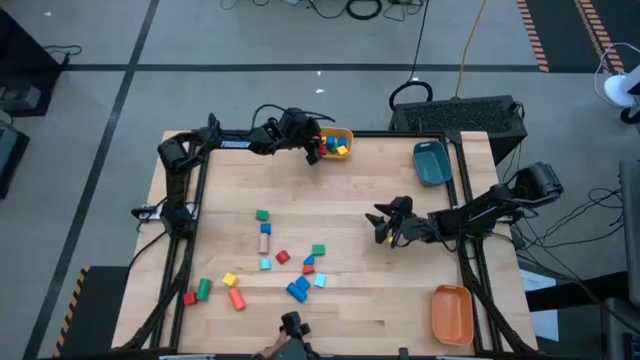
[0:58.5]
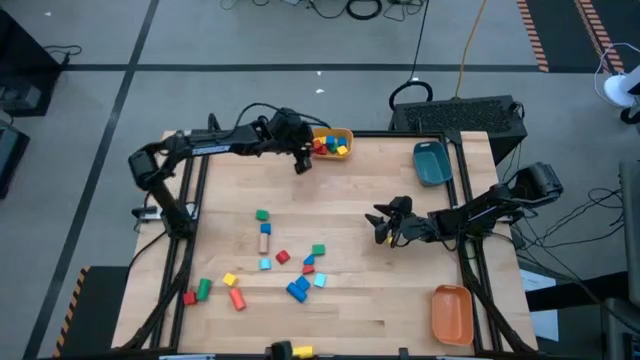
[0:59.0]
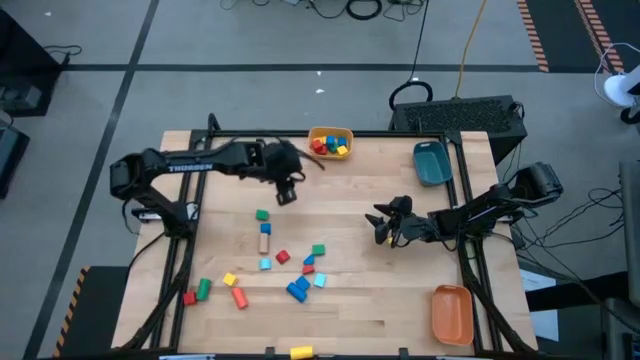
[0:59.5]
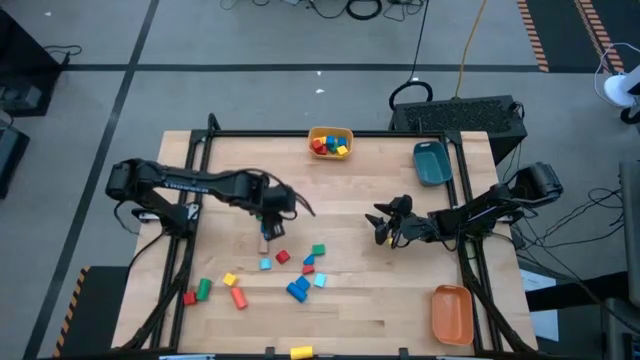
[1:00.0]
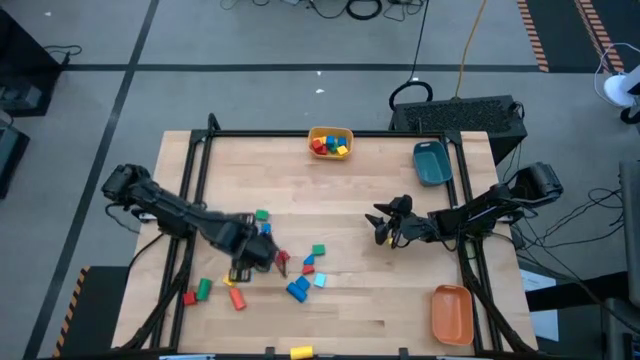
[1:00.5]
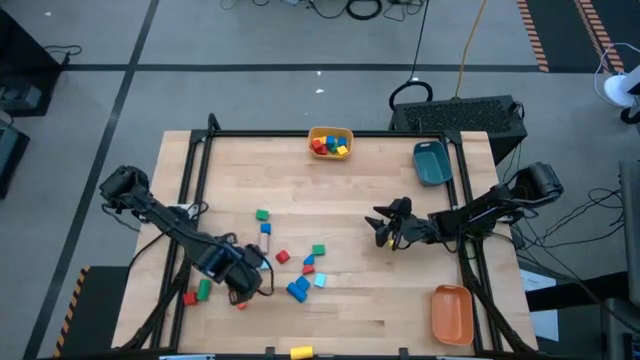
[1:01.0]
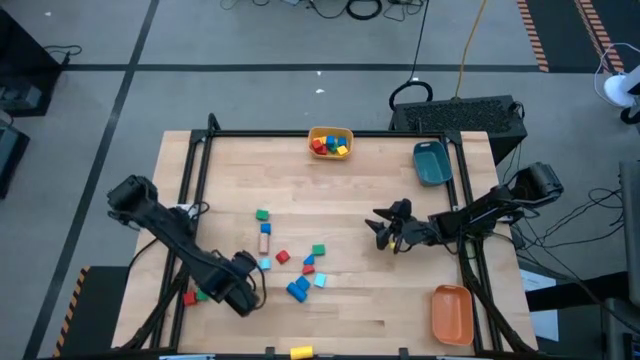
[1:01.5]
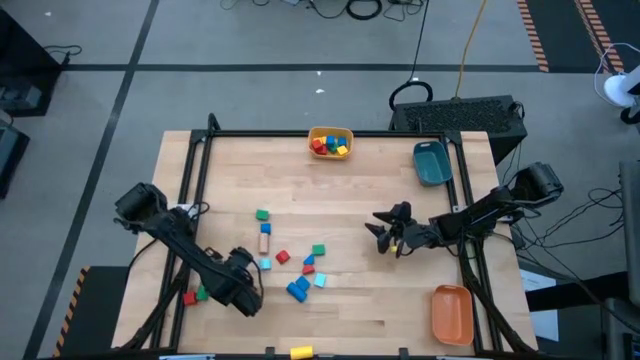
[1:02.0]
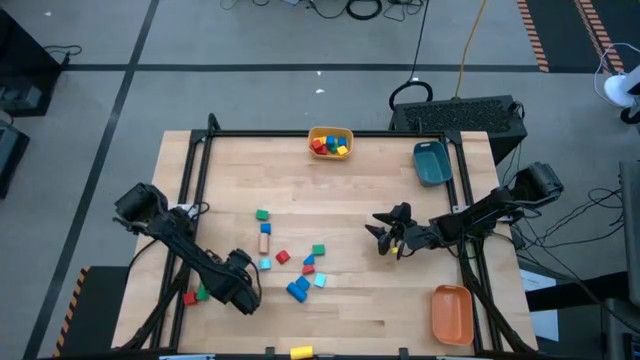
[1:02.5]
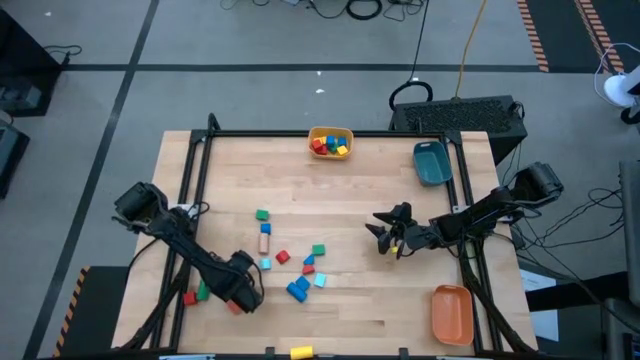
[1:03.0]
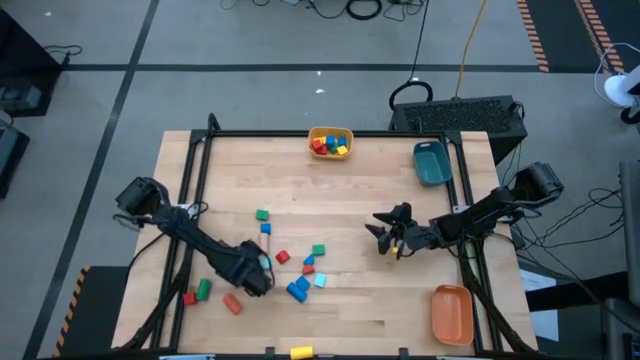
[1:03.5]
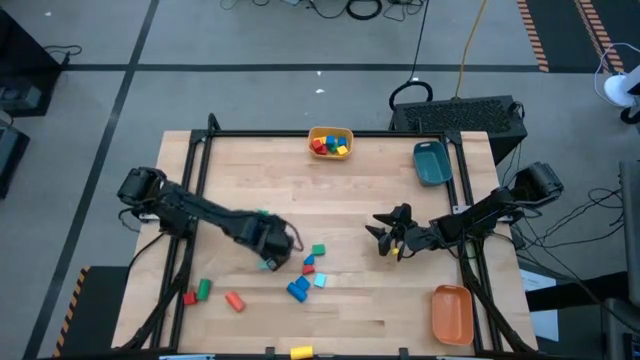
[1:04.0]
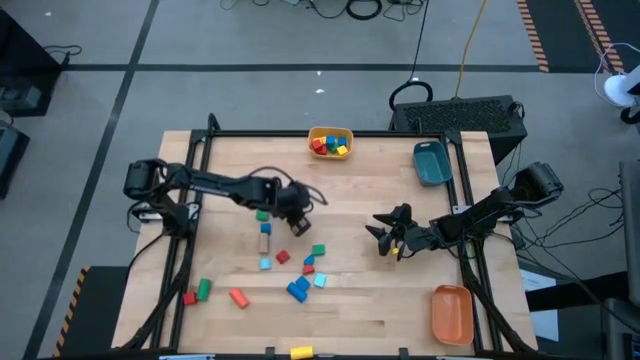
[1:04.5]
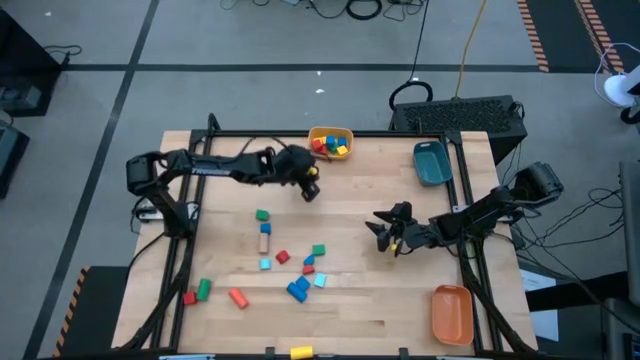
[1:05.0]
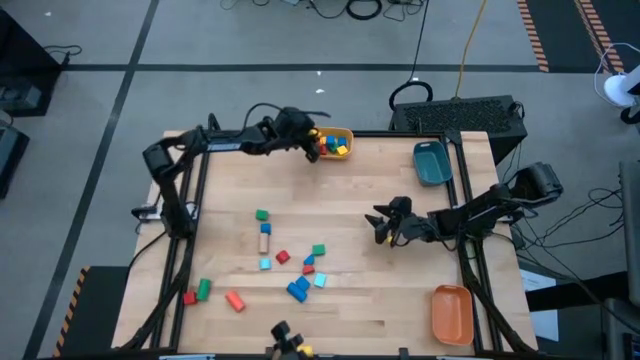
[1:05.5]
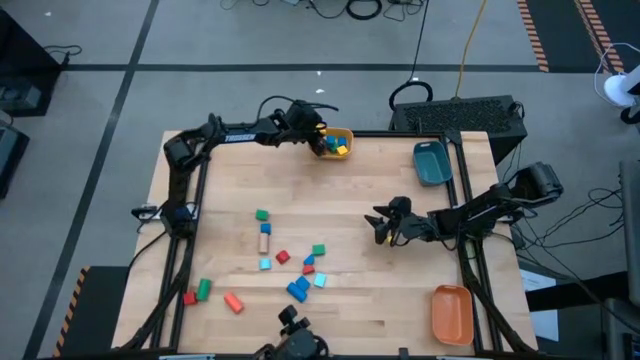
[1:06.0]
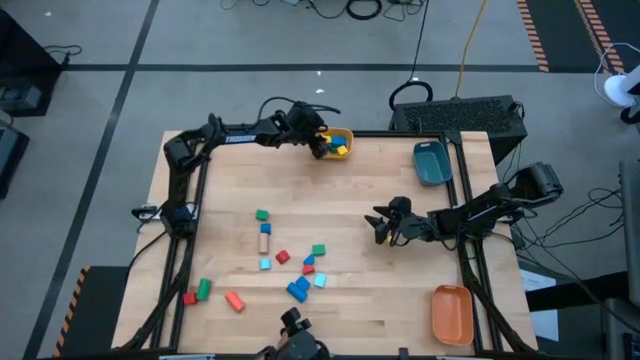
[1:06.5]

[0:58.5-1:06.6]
Task: Sort blocks by size
Put the yellow square block into the yellow bin

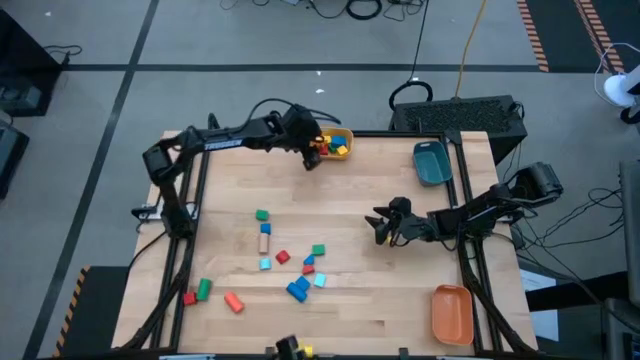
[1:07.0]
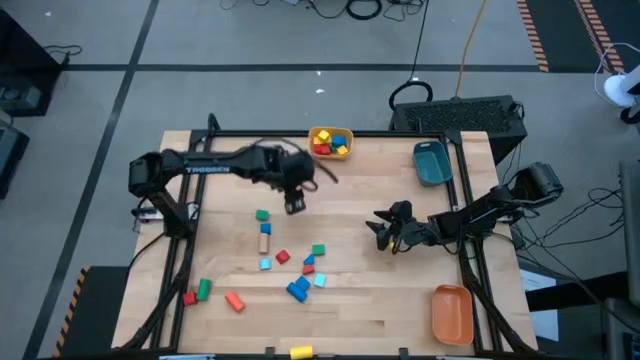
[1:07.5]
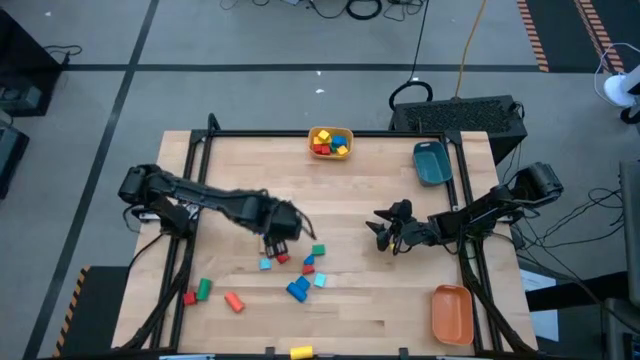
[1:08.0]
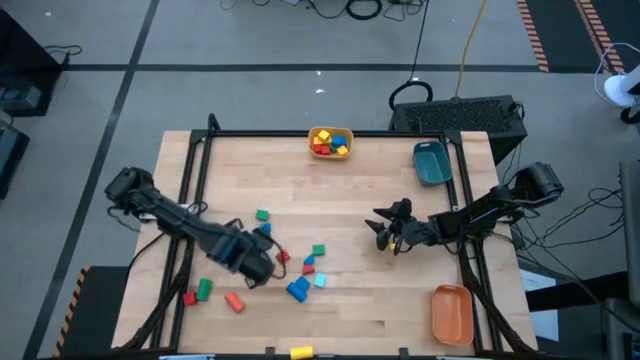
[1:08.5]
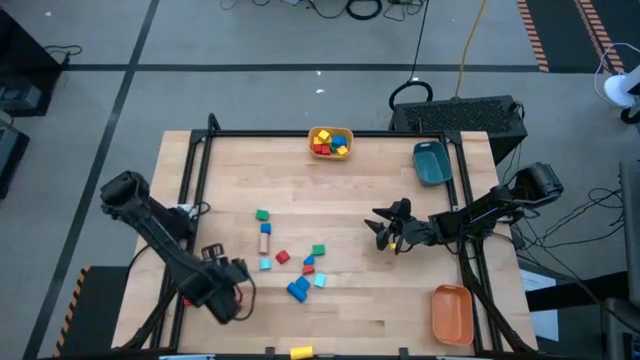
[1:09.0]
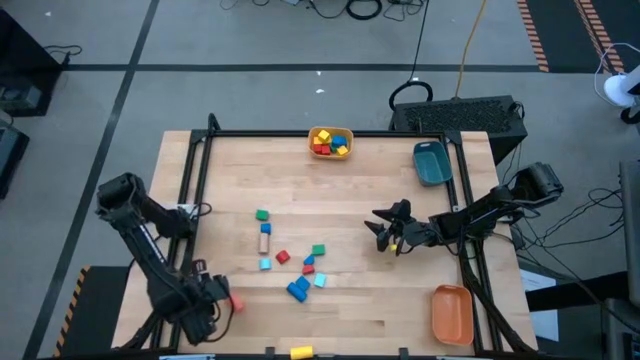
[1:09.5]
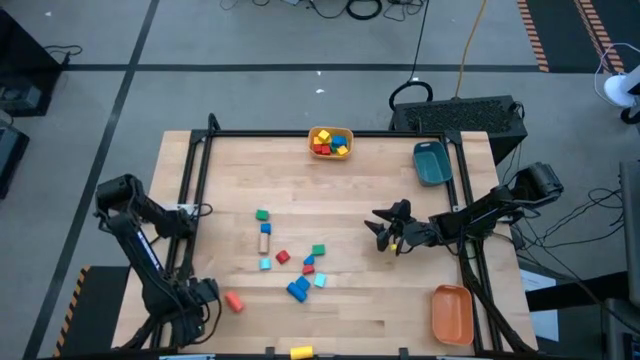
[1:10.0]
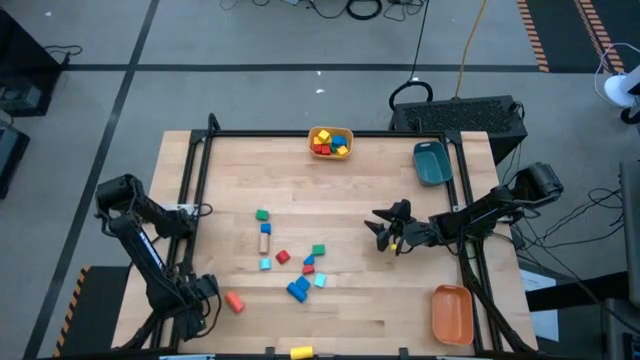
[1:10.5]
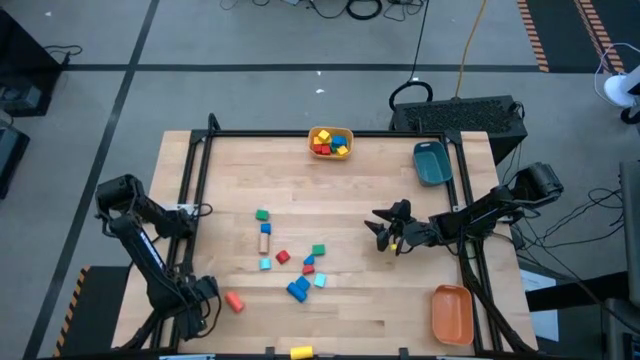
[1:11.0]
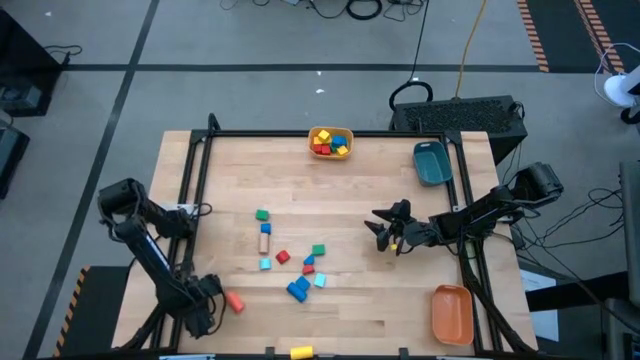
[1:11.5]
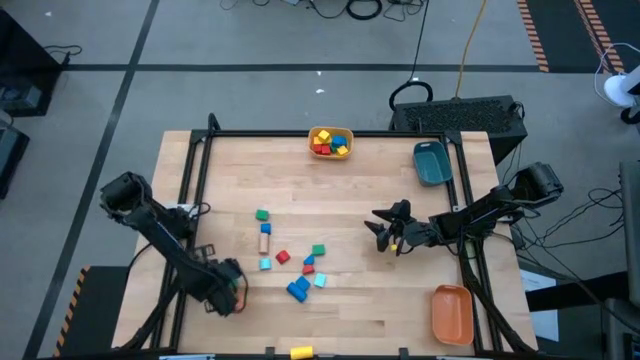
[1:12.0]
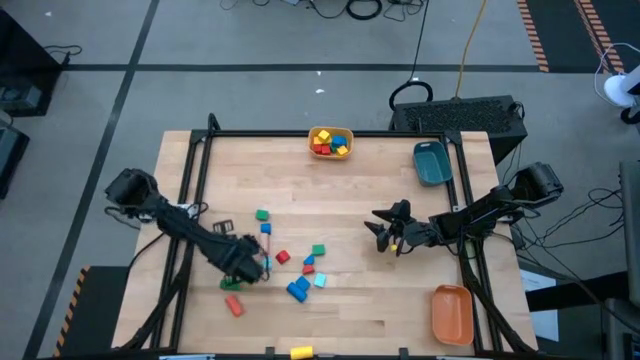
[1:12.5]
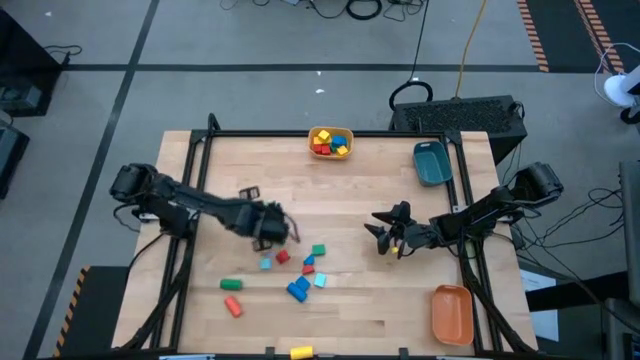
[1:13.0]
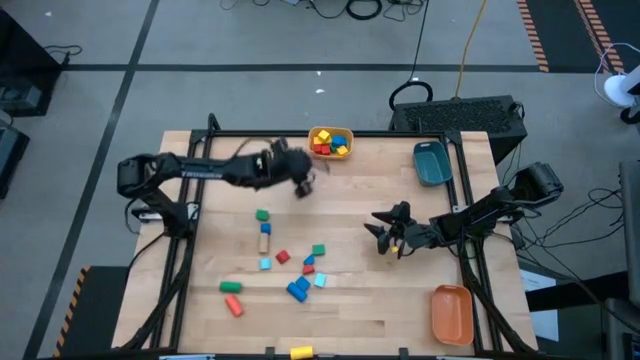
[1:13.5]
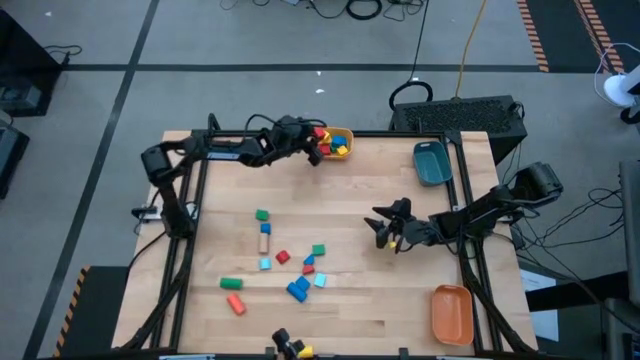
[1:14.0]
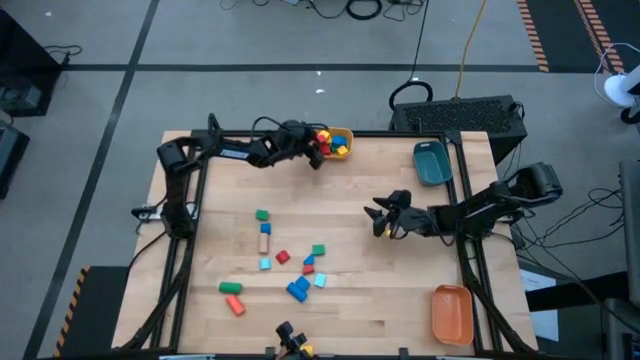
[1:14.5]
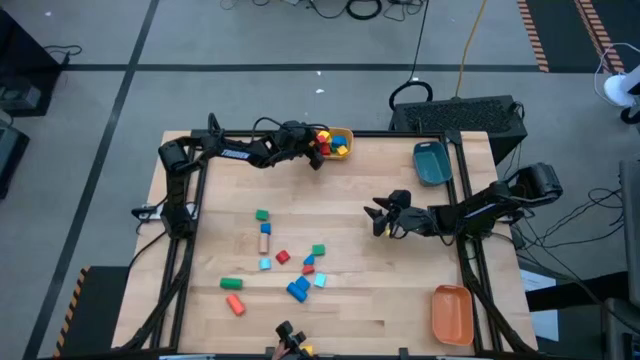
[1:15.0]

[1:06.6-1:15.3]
Put the red square block into the yellow bin

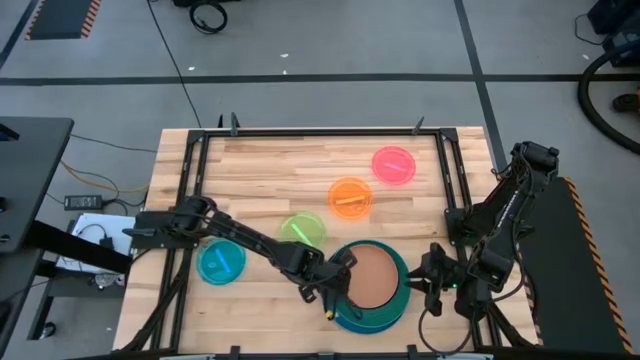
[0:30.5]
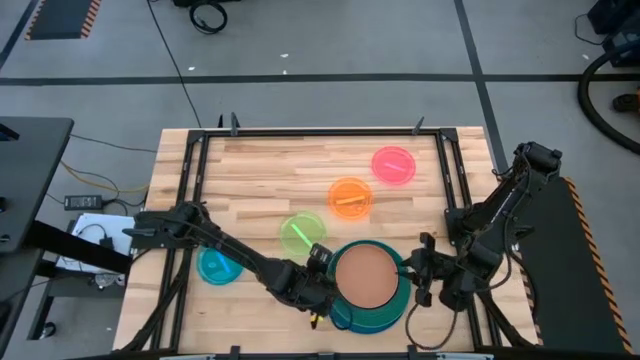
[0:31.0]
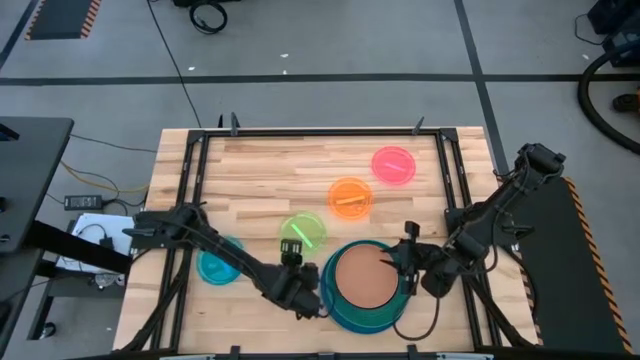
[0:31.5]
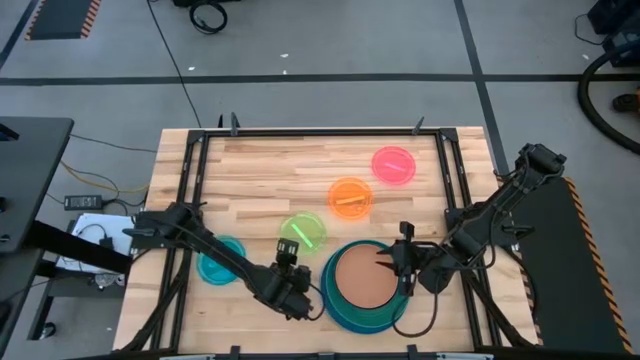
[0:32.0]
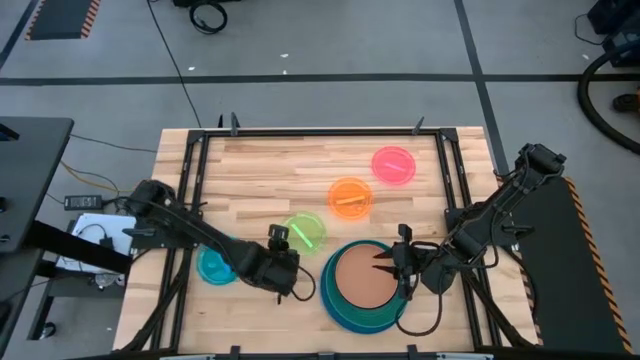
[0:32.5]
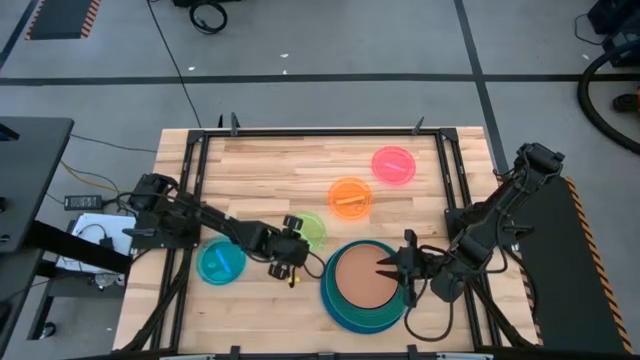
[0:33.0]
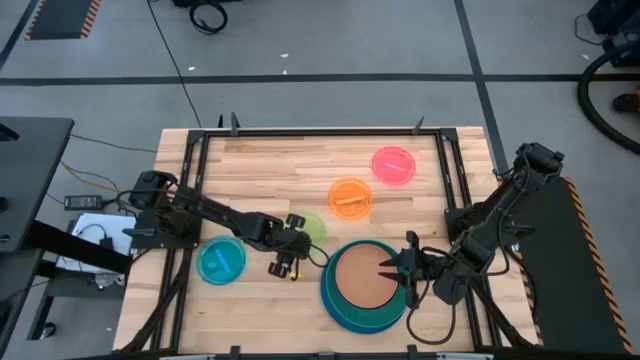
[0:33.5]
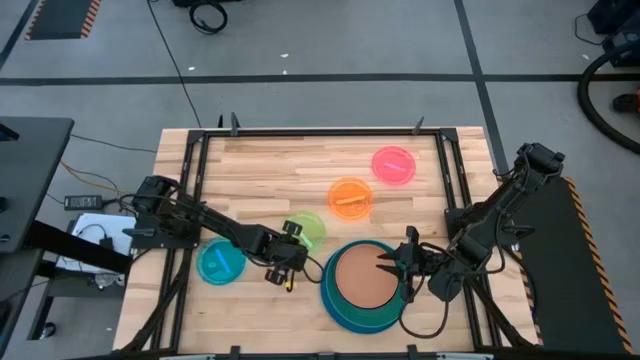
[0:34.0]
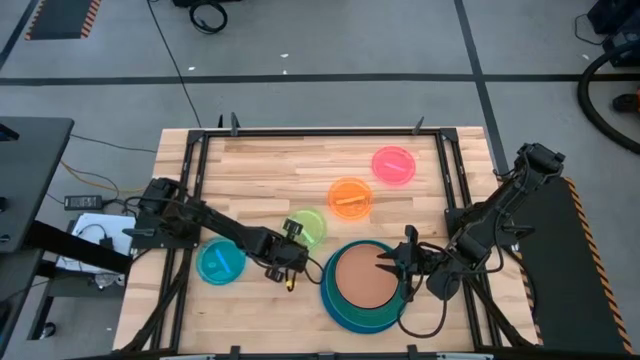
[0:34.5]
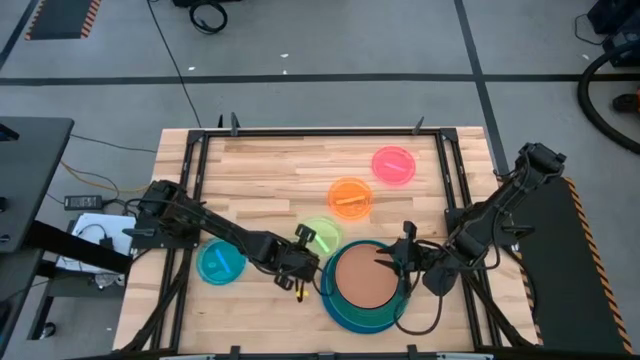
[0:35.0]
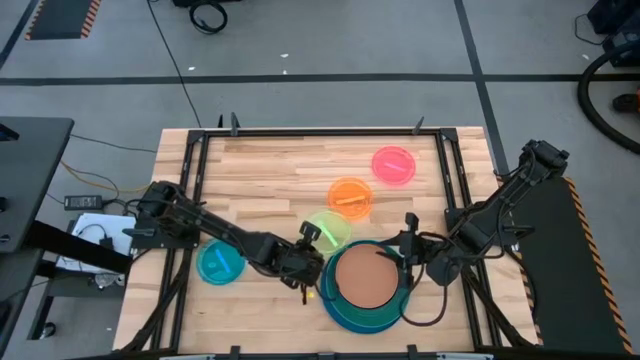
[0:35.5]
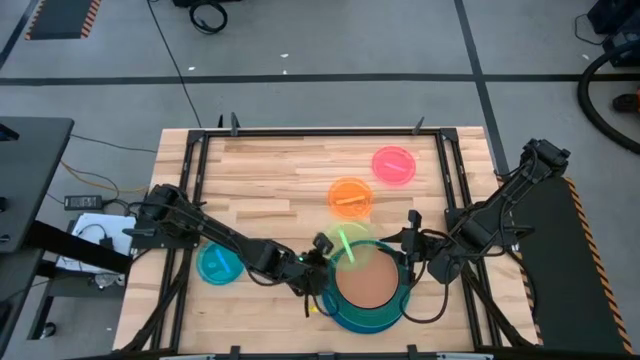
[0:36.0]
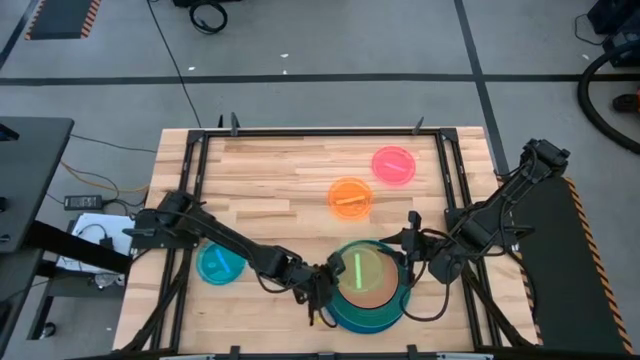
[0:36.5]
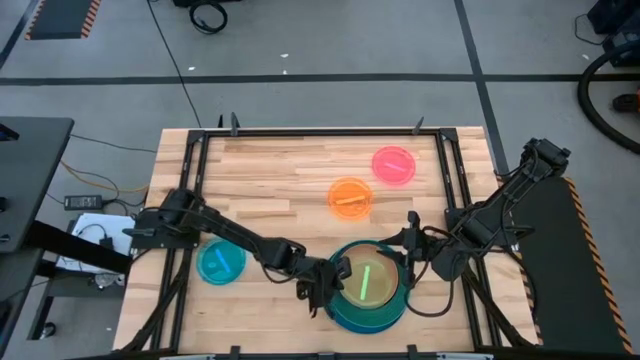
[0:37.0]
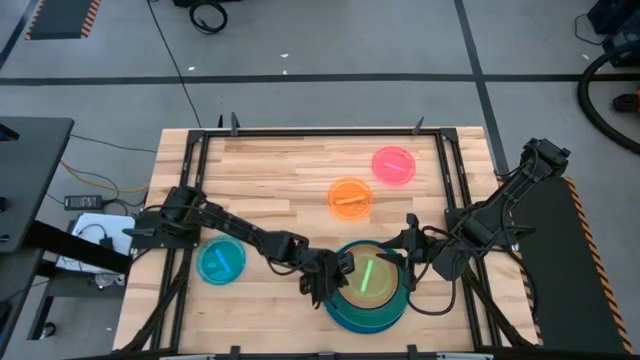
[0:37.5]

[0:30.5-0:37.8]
Task: Stack plastic plates
Stack the transparent green plate on the top of the brown plate
